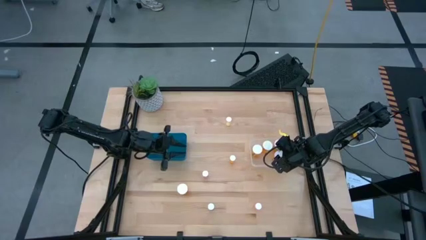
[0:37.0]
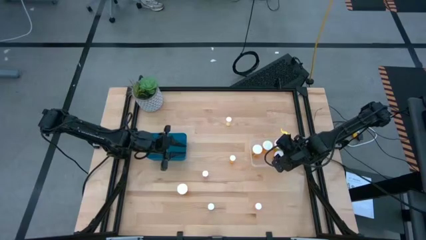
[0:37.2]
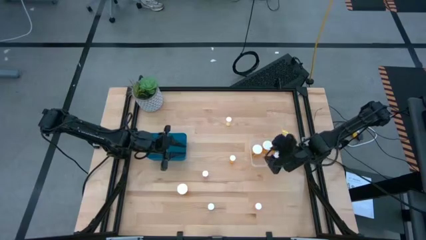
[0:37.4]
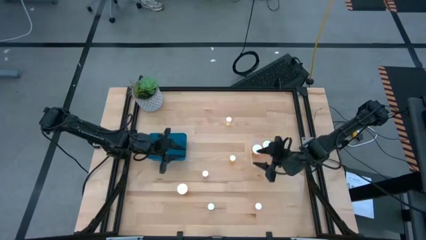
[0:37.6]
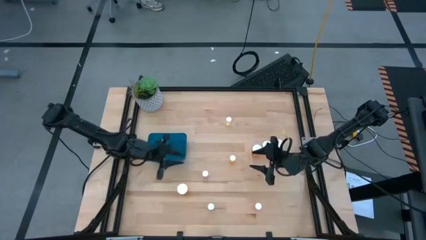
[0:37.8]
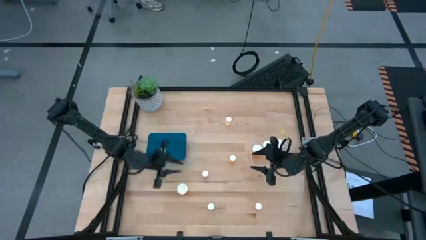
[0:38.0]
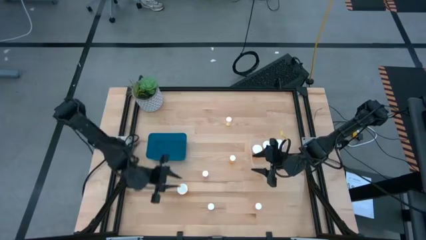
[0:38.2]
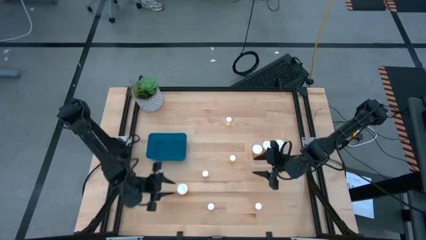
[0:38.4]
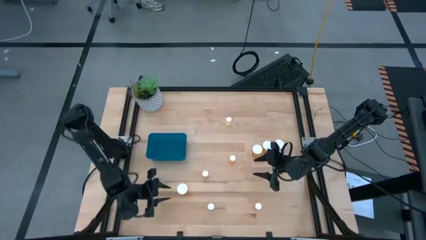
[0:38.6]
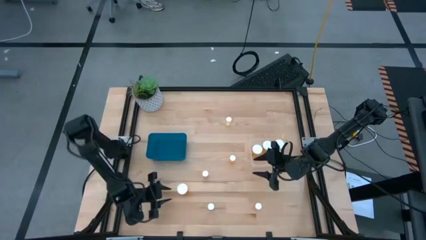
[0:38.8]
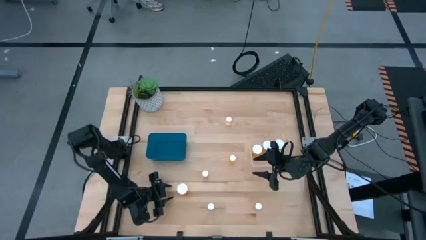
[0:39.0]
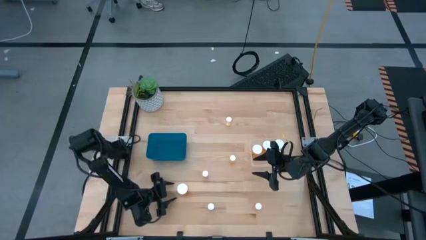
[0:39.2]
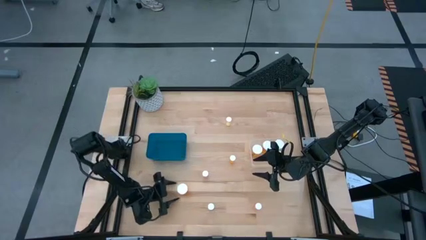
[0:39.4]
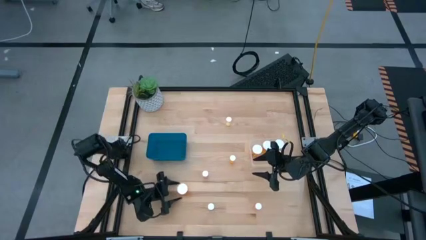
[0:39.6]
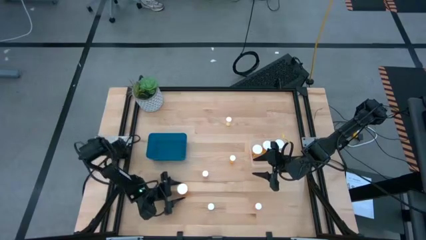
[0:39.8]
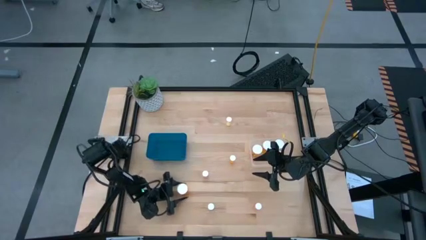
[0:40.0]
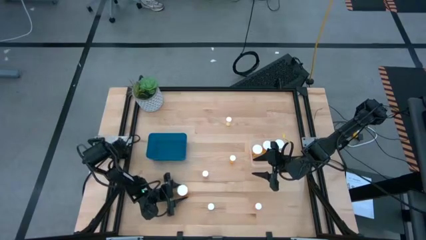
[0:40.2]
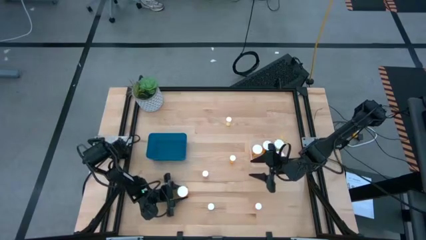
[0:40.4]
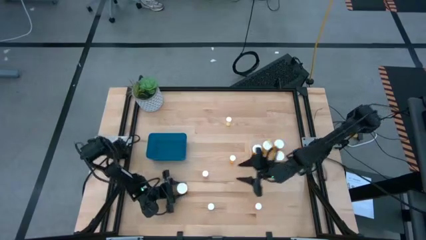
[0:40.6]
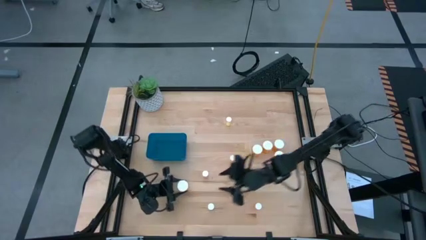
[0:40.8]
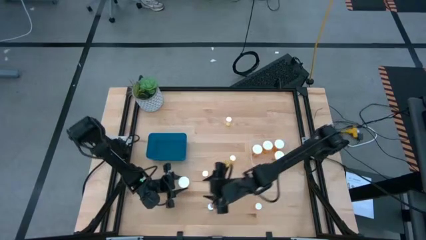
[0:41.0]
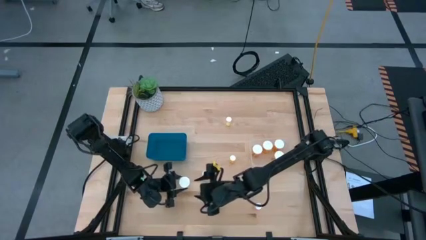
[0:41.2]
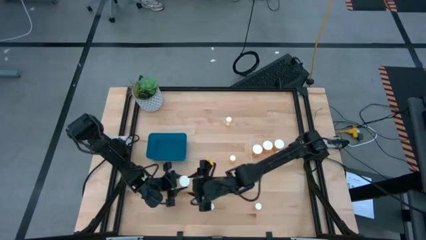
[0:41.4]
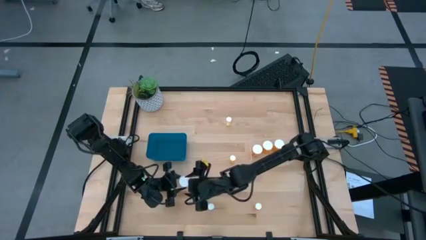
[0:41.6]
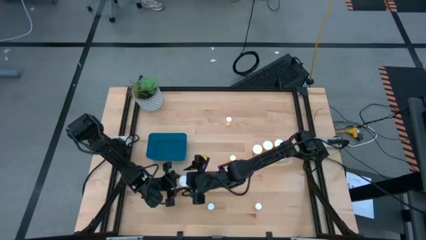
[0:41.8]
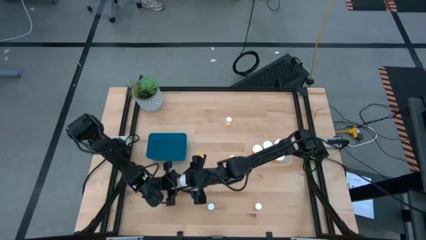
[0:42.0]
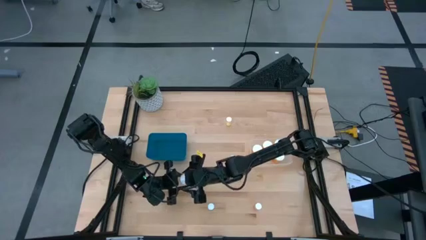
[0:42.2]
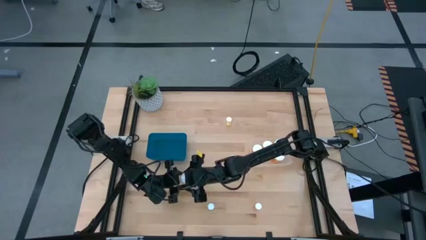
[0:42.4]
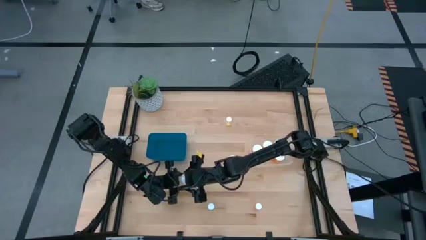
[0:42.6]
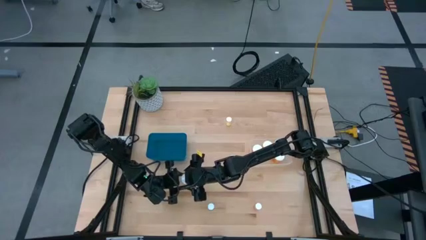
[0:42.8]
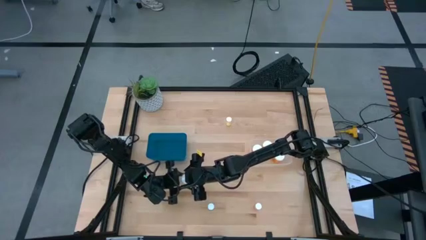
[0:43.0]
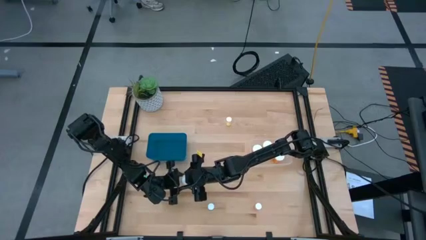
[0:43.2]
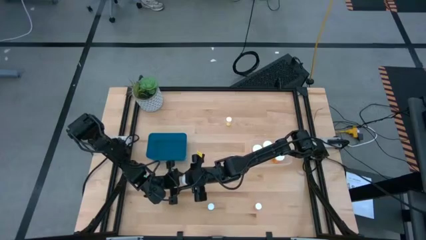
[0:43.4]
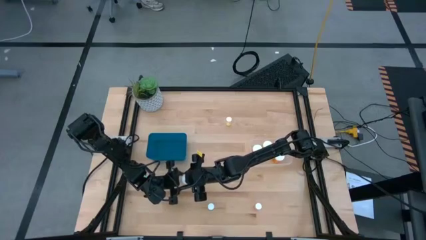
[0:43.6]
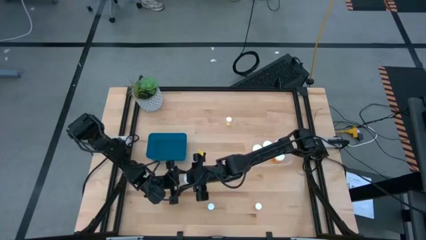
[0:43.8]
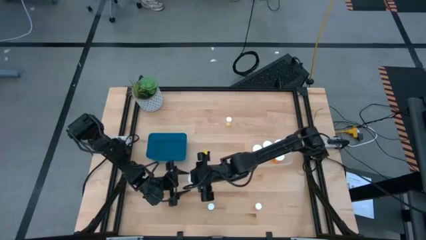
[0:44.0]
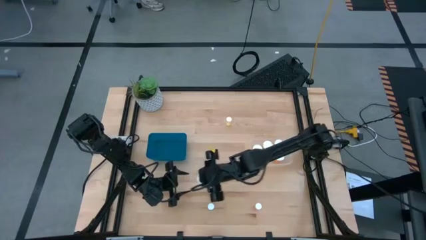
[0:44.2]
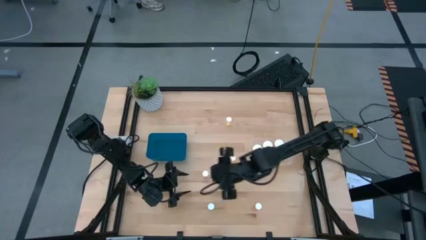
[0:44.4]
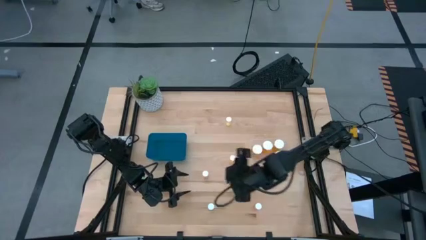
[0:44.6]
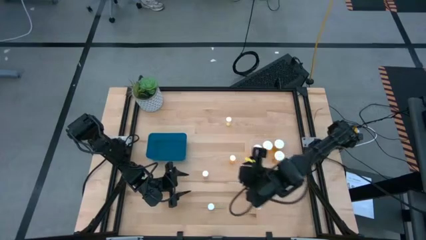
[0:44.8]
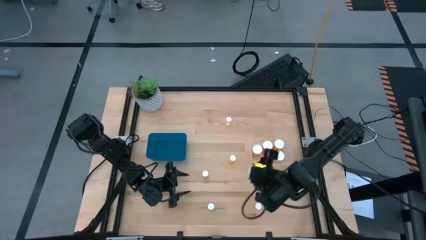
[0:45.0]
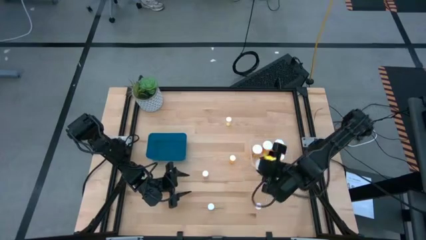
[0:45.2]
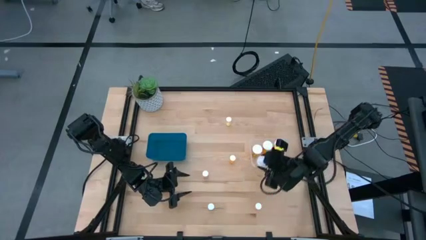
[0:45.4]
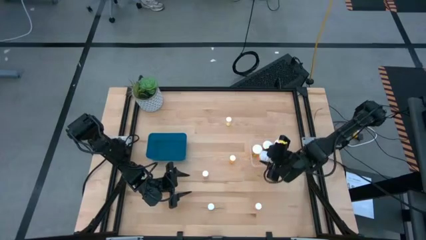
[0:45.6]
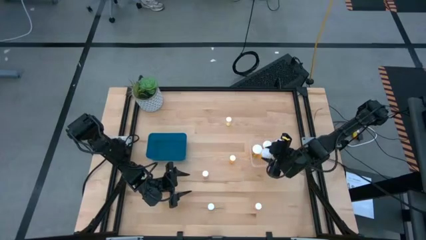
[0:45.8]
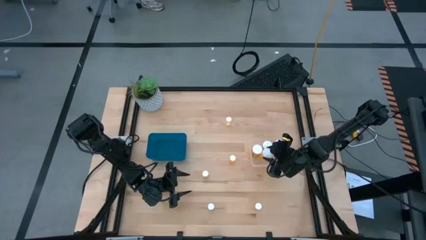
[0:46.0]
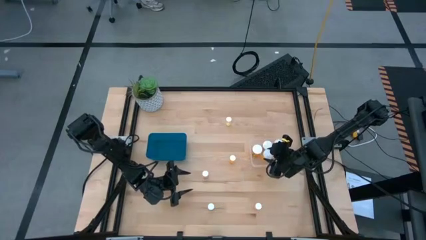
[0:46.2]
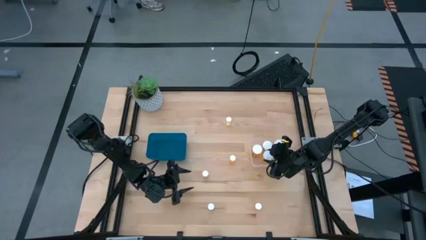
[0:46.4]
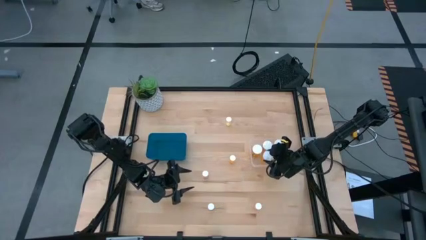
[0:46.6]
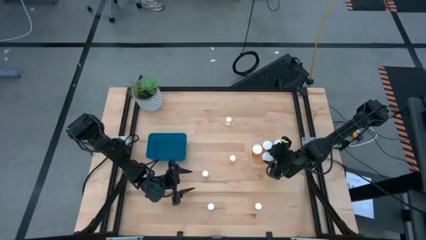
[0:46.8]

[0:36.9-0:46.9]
Task: Pick and place medicine bottles into bin by pill shape (circle, oval)
Put the large orange pill bottle into the transparent bin

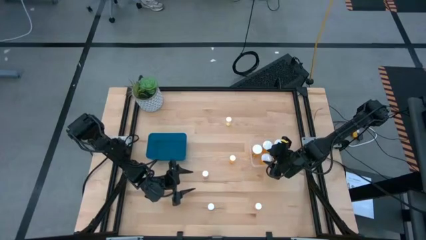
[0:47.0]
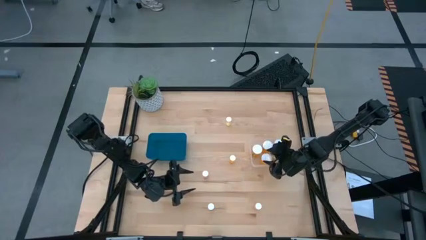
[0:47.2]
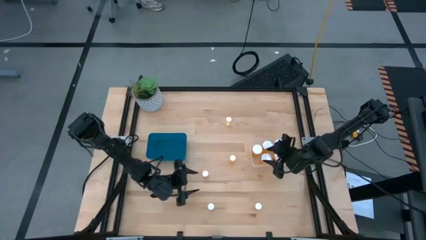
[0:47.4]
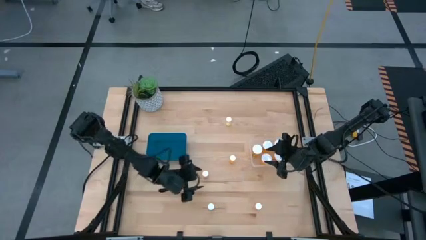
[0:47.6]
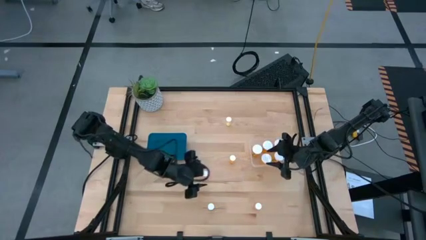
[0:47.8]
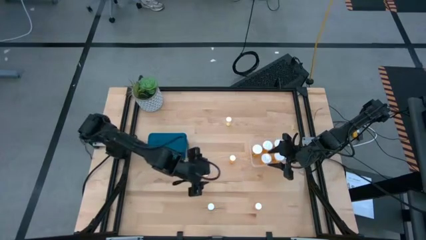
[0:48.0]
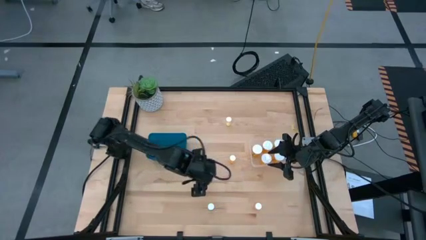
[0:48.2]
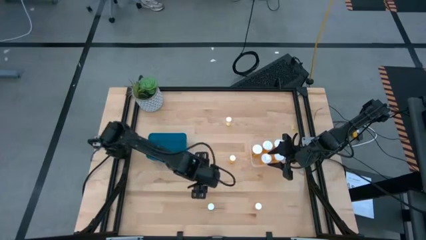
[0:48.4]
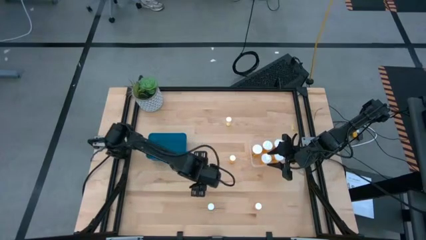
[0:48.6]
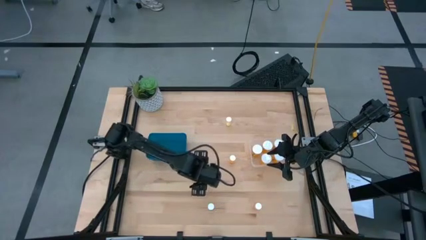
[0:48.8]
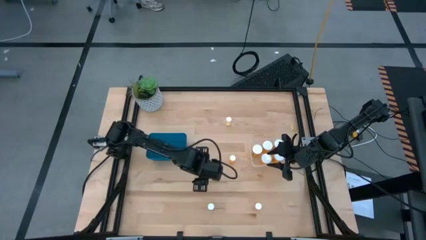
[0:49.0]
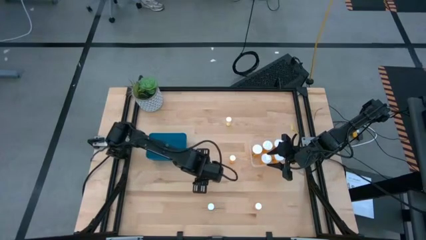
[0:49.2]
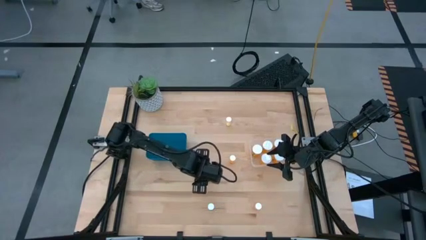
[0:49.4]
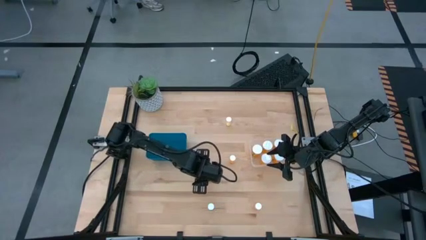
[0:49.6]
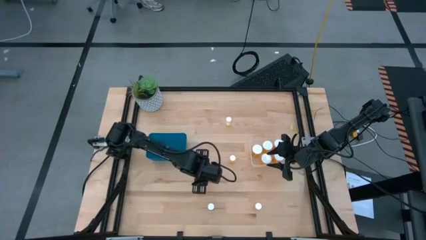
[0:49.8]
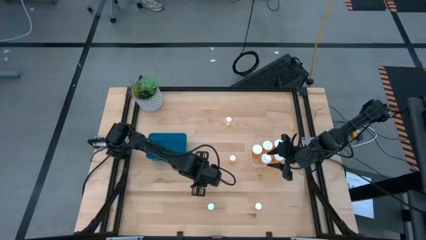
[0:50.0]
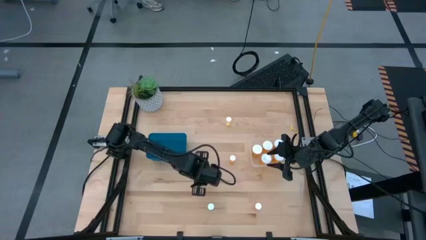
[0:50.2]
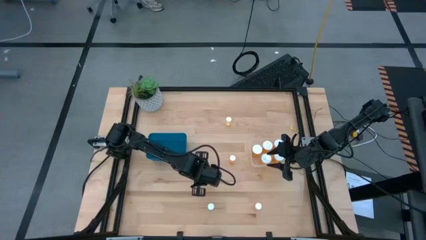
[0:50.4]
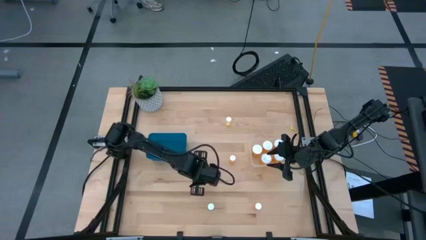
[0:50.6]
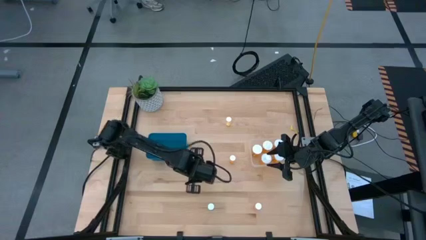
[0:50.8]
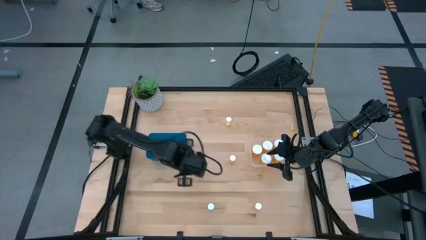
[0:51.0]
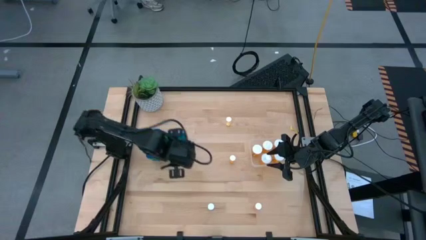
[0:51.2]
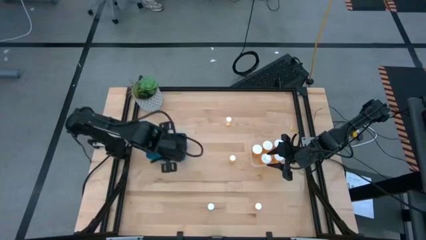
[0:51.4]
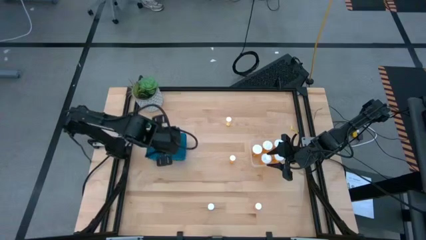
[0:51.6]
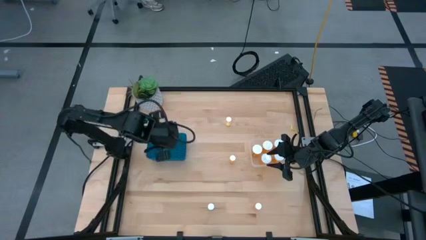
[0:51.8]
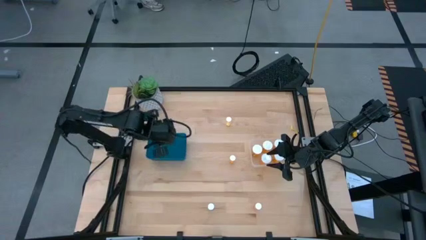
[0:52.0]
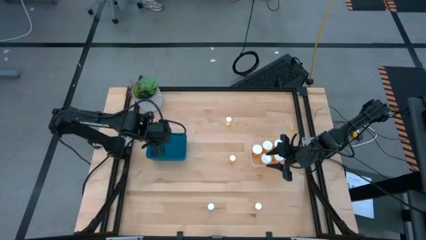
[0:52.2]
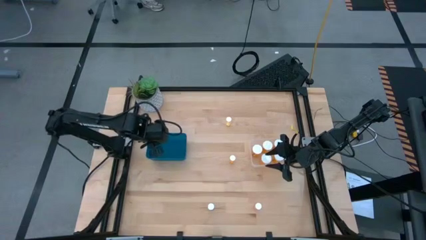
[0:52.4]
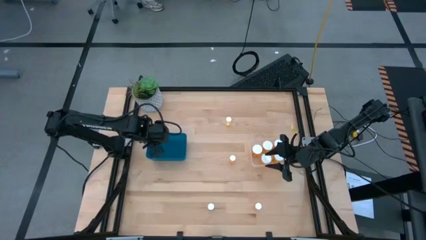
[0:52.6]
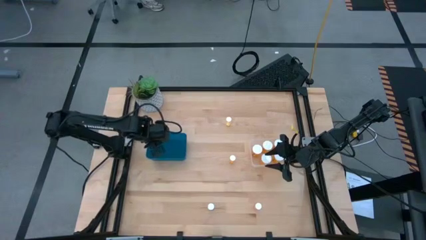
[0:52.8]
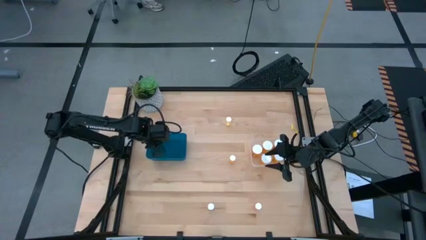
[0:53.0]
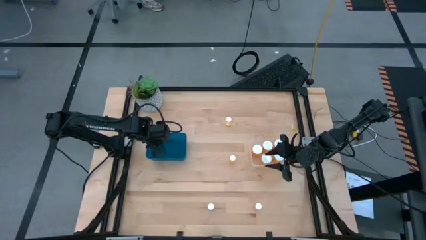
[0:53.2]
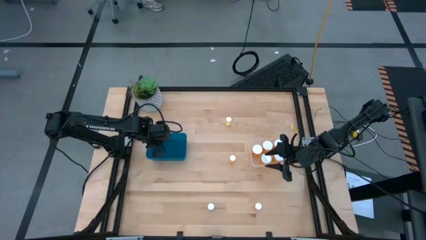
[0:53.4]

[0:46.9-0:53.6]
Put the small pink pill bottle into the blue bin

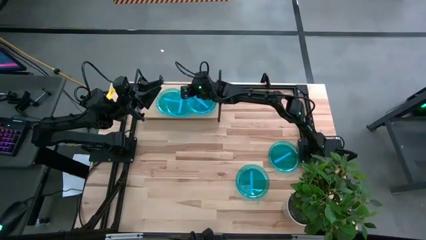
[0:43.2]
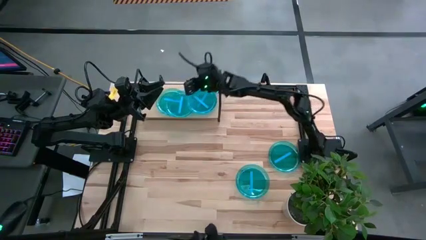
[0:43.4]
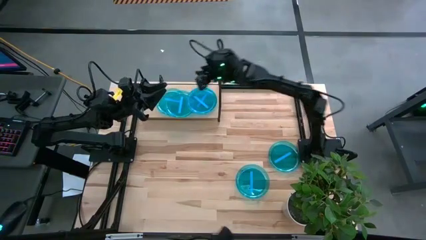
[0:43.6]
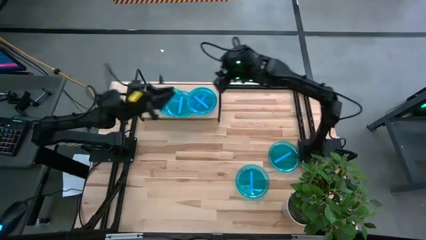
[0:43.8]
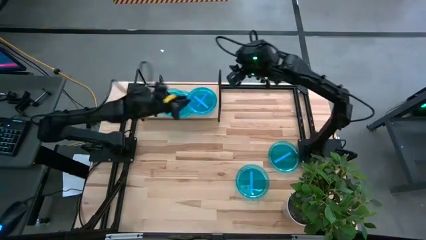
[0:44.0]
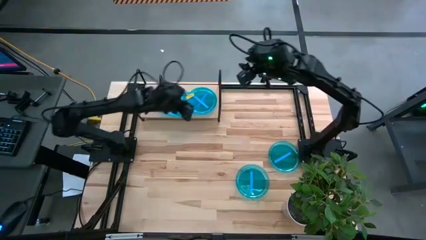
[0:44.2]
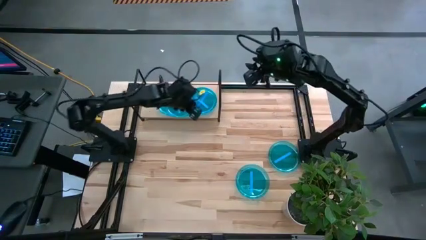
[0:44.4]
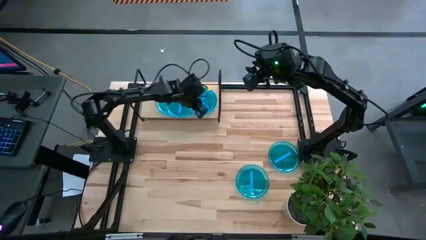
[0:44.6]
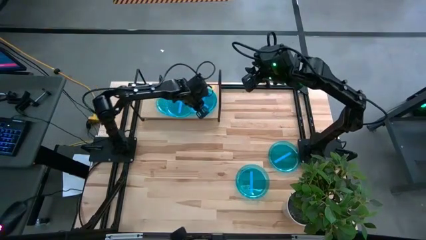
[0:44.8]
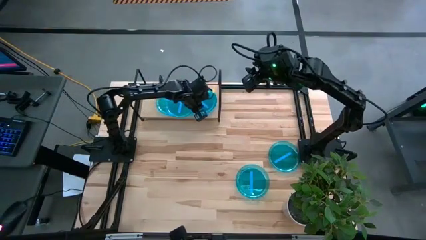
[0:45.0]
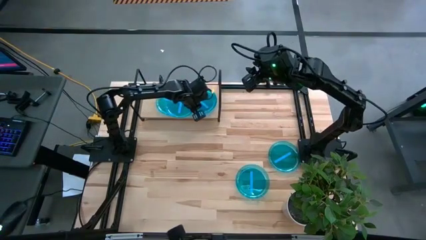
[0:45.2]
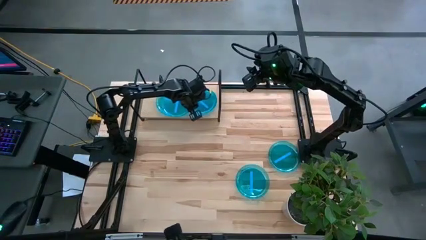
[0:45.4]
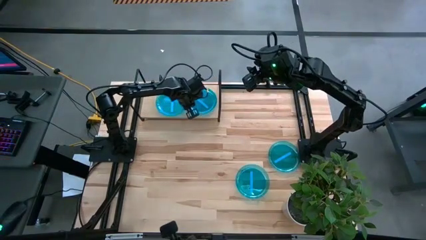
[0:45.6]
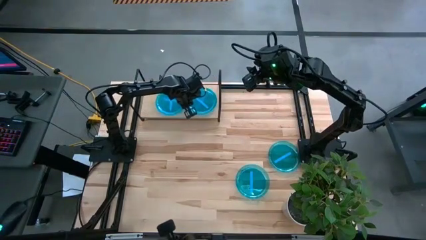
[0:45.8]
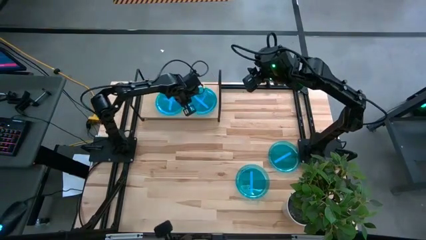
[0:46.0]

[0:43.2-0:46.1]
Task: Place and stack plates onto a shelf
Stack the blue plate on top of the blue plate on the shelf
